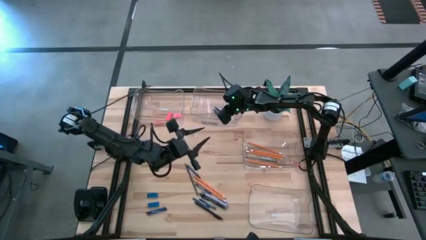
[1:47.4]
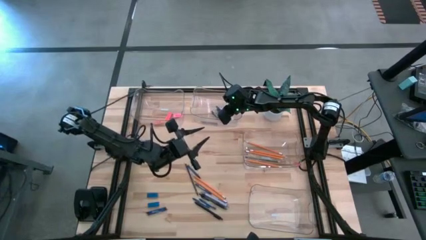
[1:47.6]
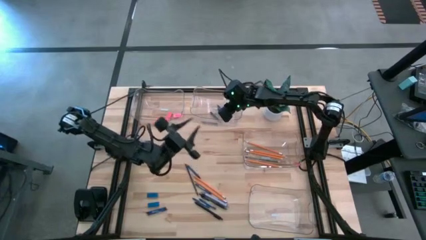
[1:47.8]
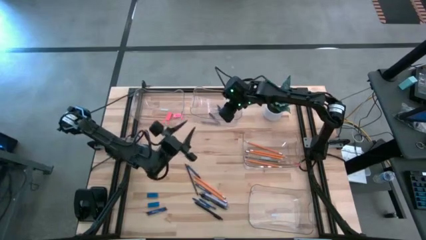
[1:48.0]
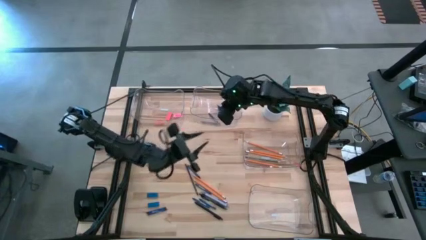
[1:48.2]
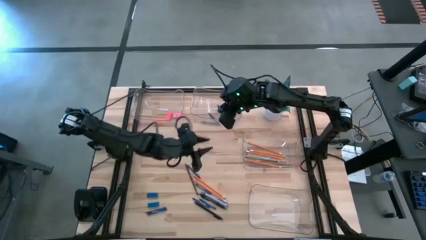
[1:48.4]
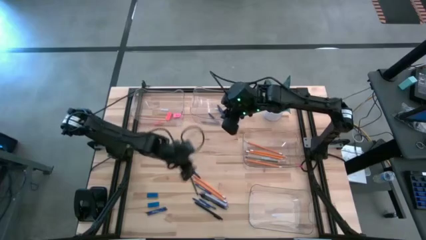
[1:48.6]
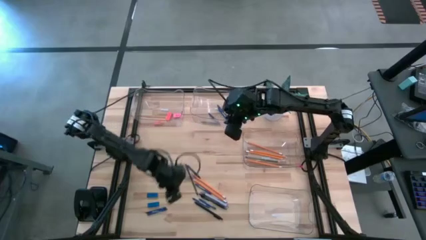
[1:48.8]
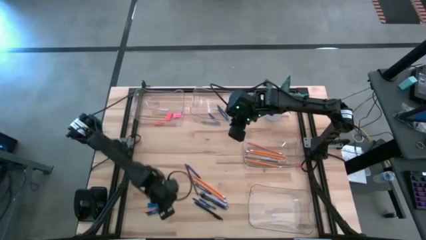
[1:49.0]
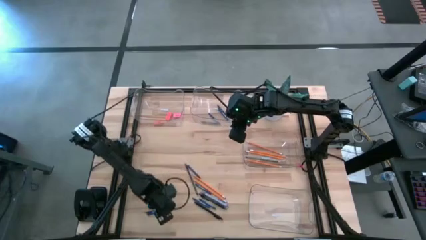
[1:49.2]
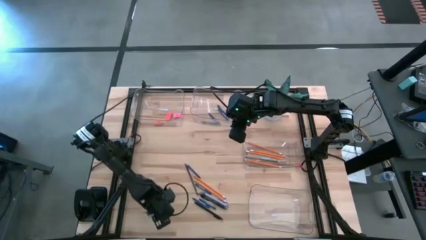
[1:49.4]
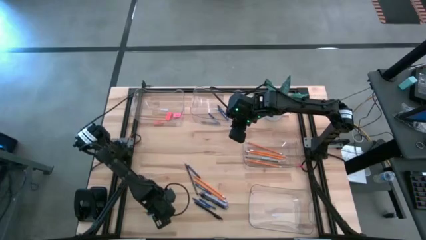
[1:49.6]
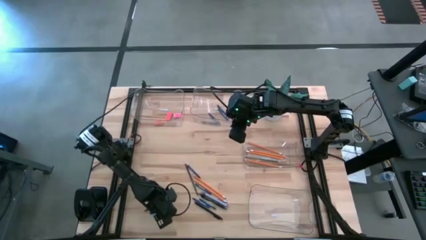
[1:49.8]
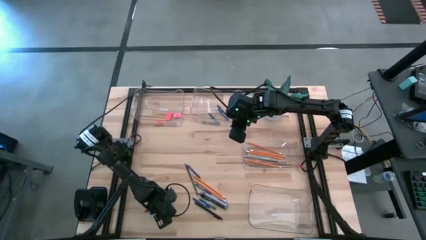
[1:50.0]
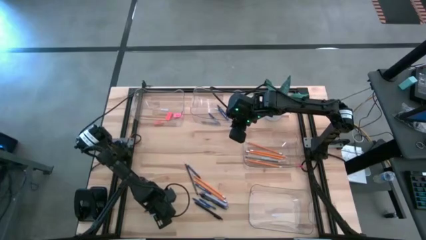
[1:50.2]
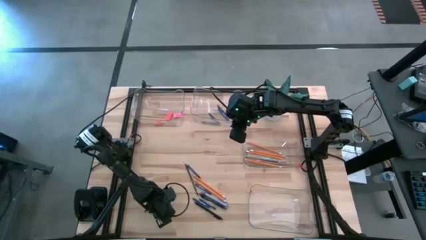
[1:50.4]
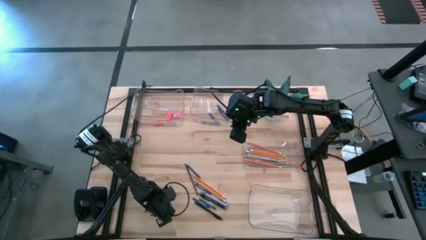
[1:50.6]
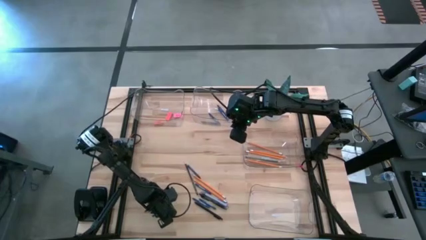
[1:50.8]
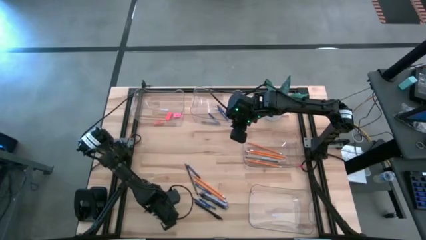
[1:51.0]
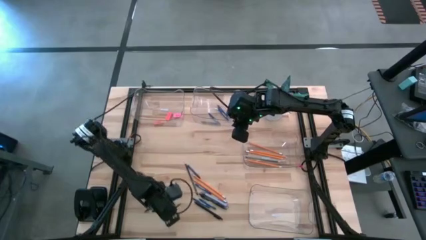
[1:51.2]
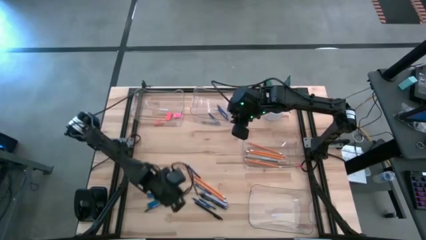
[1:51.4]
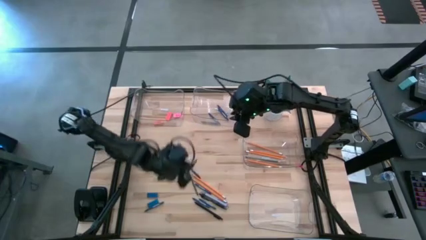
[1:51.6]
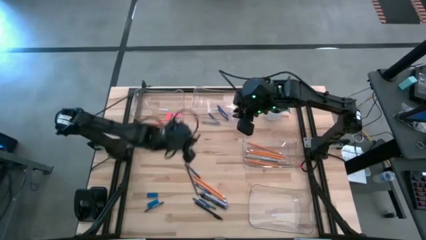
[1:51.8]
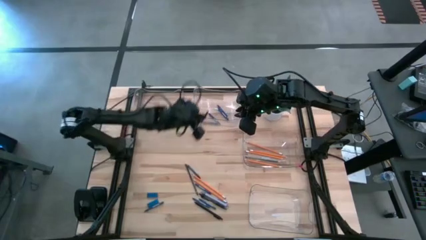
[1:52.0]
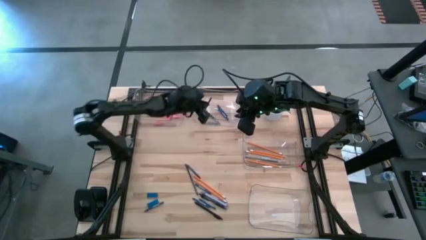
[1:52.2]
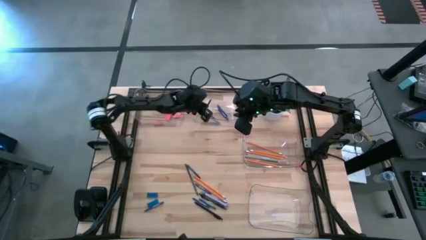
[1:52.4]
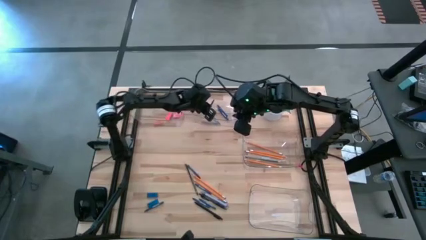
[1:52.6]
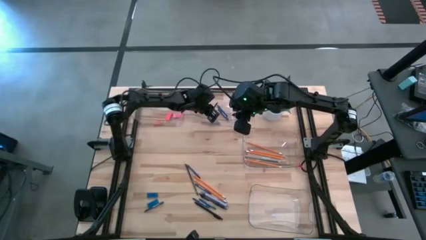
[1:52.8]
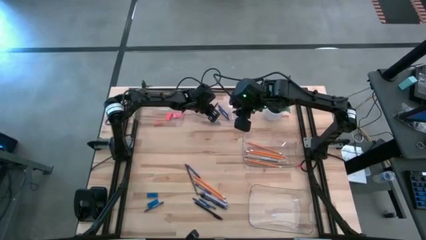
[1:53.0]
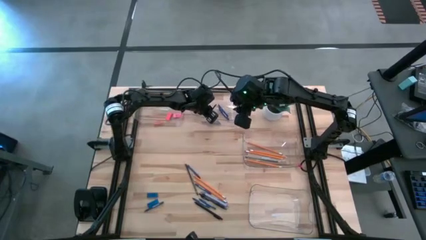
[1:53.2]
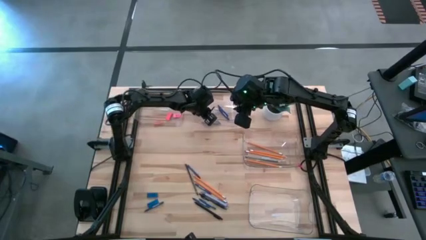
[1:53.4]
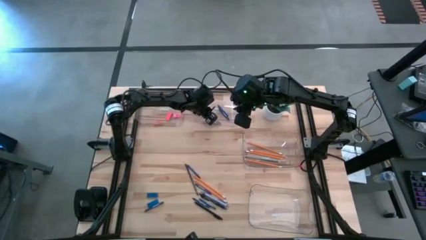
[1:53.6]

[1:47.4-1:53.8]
Task: Sort crayons/erasers/pens/pencils in bins
Put the blue crayon into the top right transparent bin

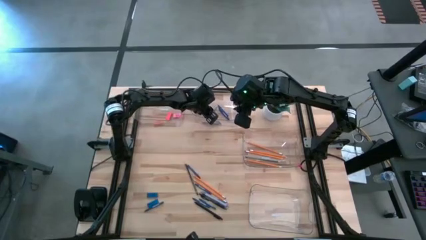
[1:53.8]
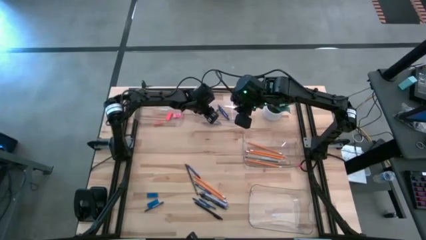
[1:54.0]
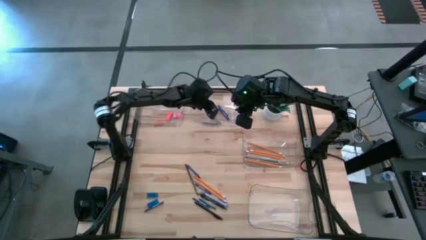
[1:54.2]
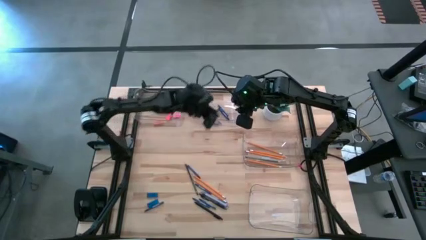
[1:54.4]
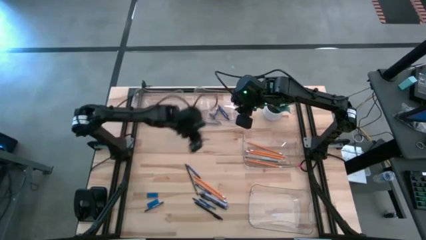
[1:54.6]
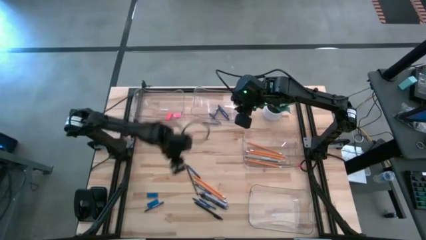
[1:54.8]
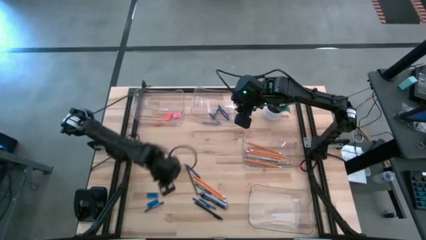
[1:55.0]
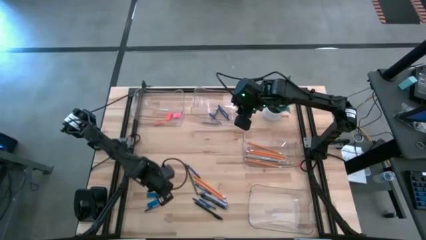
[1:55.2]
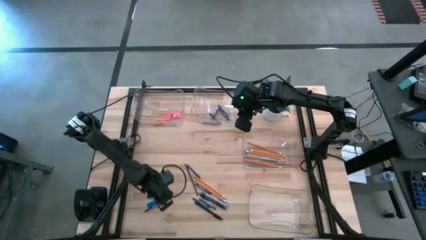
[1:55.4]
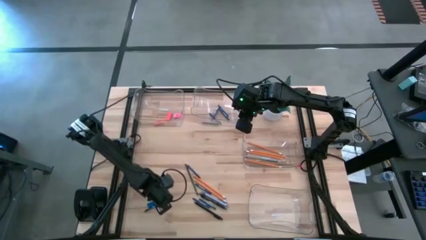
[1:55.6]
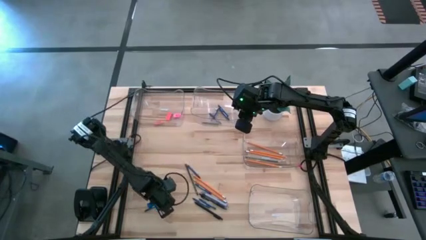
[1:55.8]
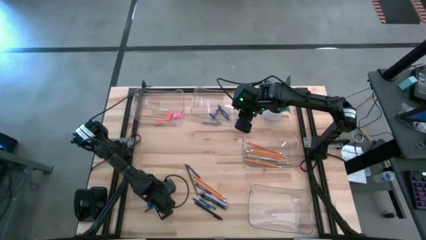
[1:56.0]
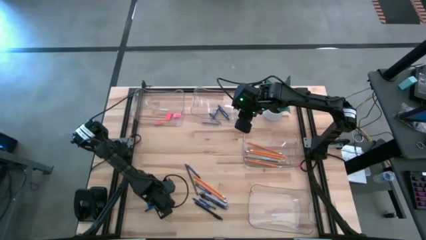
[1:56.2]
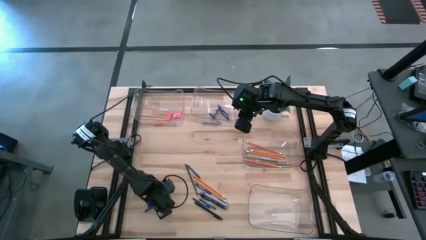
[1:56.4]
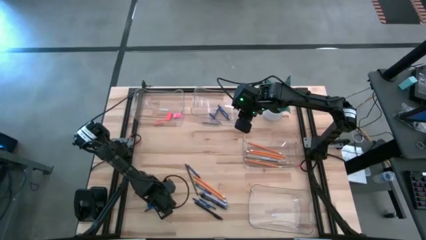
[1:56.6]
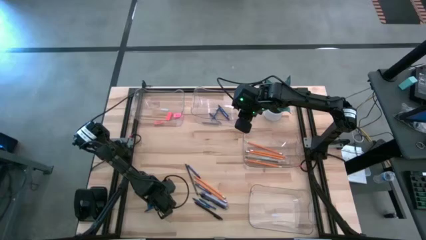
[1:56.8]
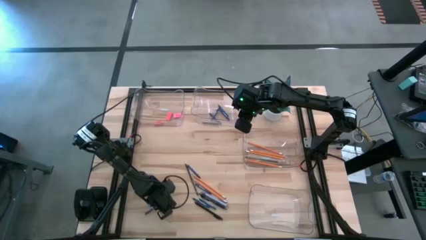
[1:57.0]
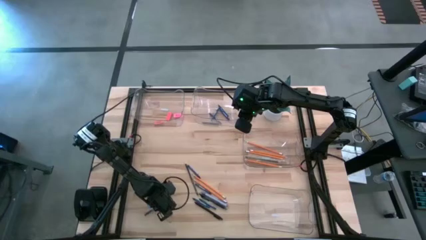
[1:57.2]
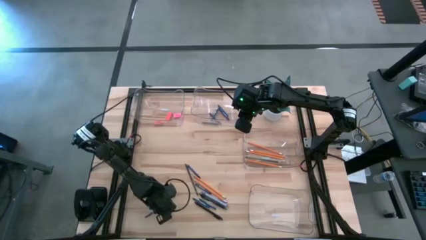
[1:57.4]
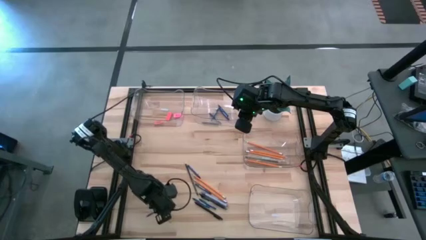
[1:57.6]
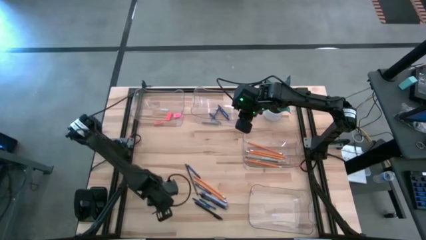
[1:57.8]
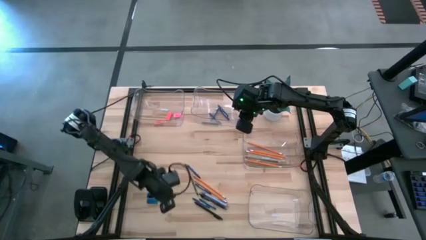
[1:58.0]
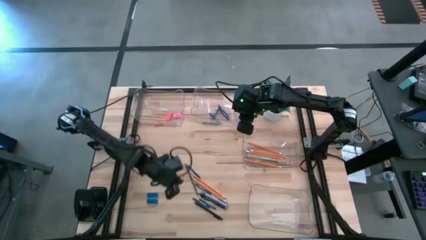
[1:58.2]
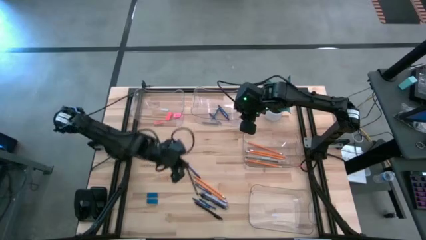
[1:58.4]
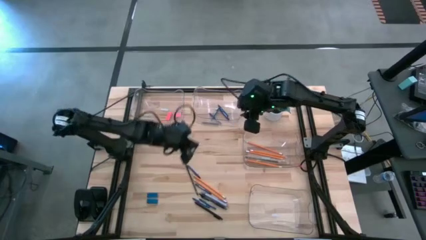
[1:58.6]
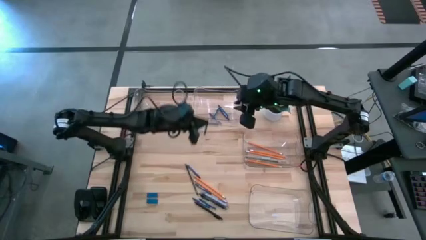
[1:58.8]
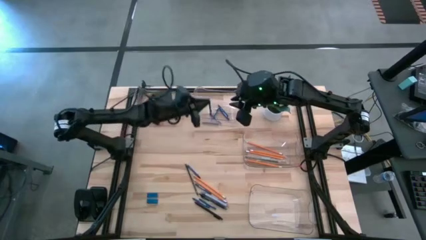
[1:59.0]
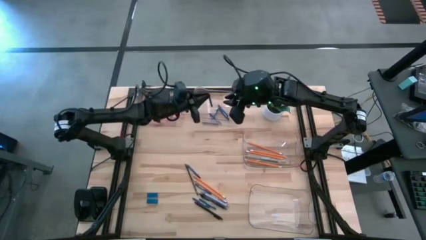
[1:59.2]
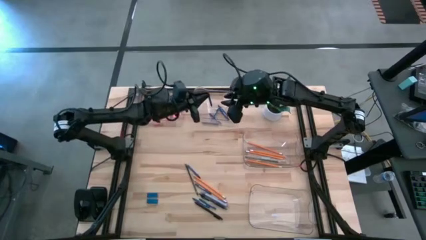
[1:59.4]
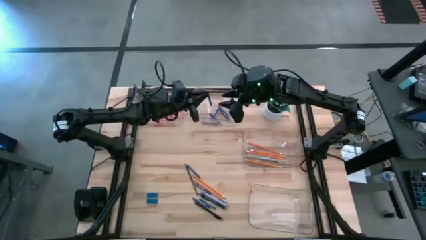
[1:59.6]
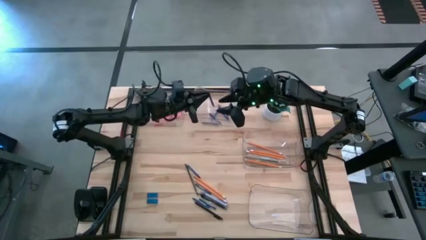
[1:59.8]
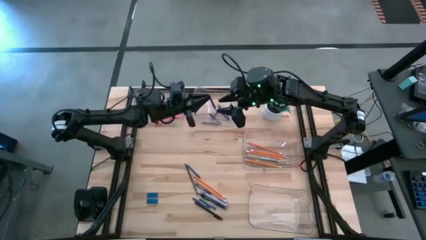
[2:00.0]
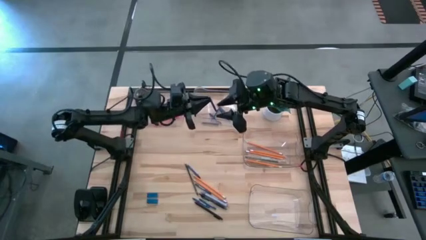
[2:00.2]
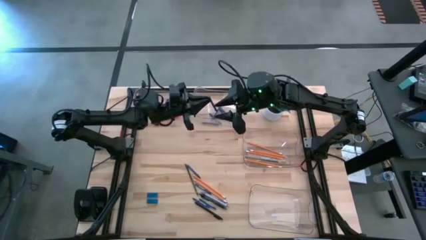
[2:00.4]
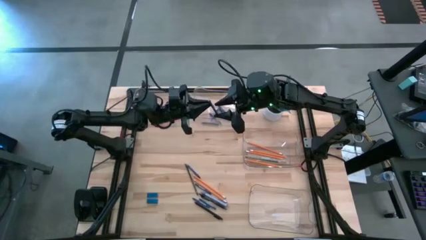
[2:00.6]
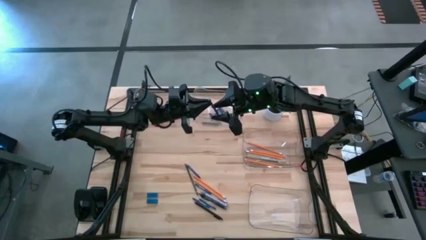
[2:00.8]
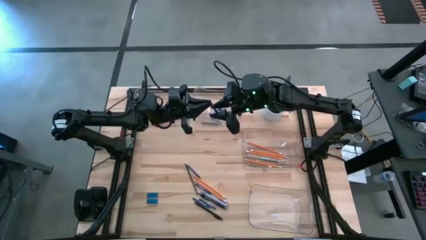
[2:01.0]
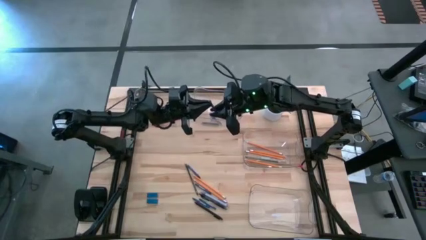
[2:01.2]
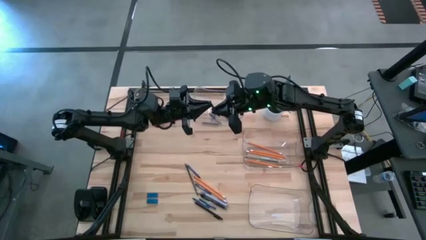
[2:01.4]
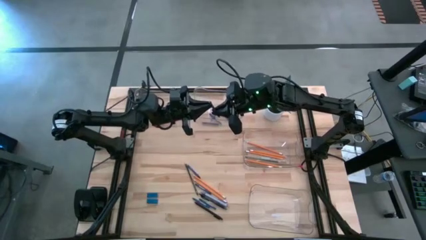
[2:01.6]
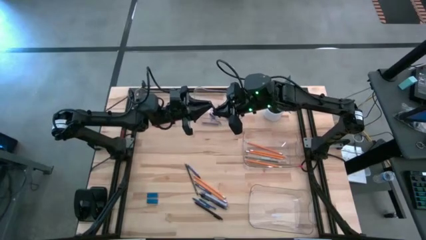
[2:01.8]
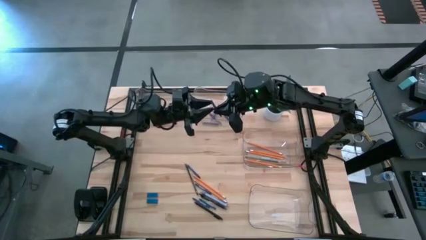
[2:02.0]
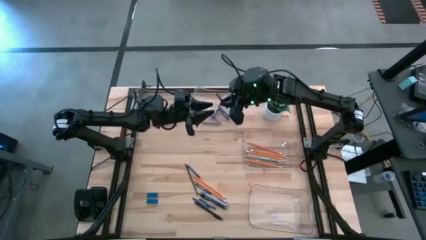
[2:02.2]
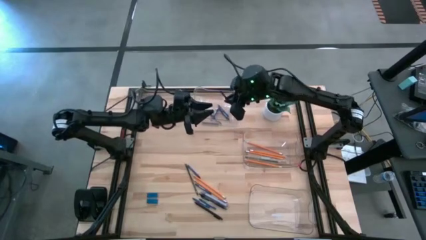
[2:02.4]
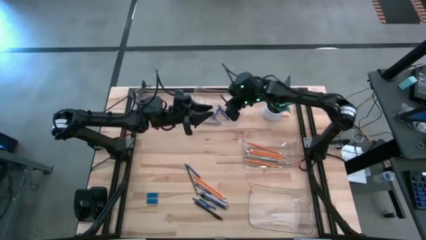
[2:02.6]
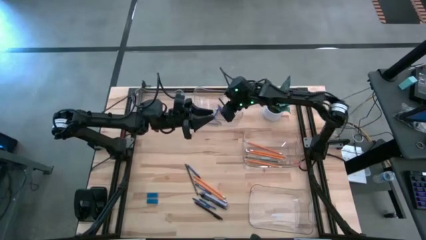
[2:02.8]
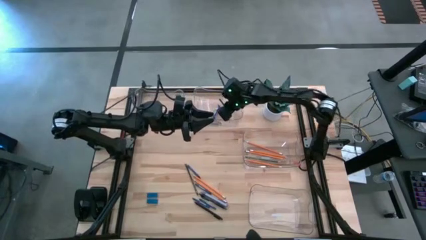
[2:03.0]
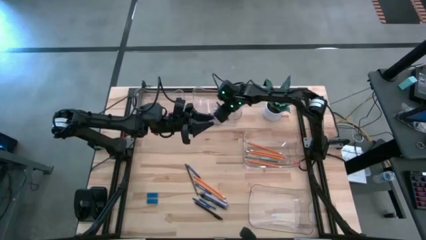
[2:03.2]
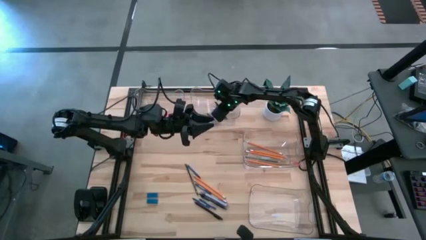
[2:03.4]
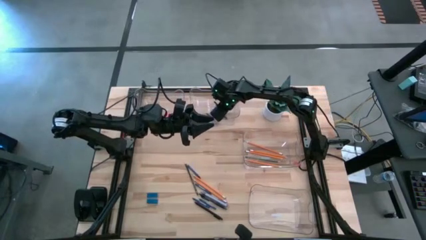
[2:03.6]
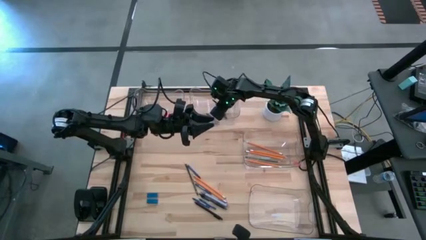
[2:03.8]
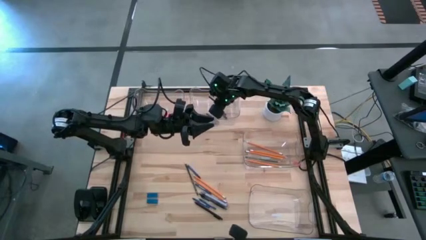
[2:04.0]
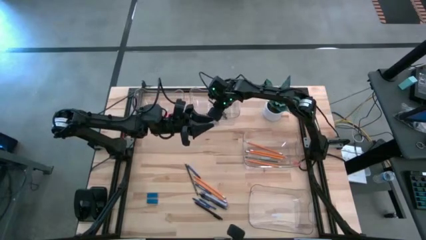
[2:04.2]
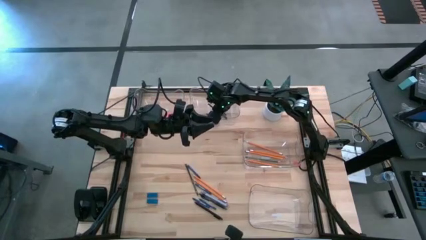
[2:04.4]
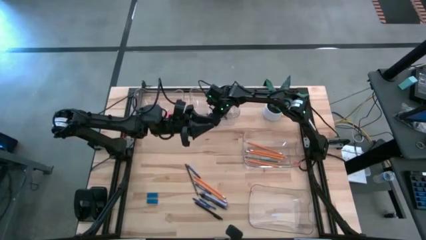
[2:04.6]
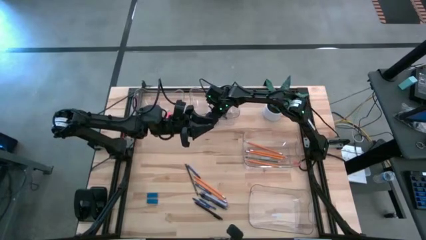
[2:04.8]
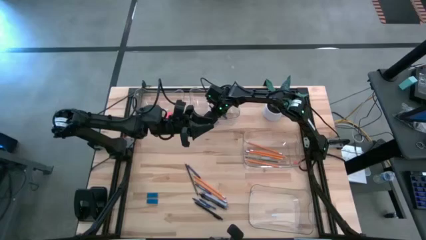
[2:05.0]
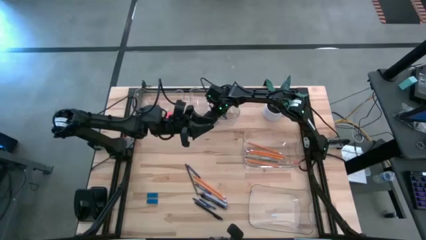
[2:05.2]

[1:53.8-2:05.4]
Put the blue crayon into the top right transparent bin
